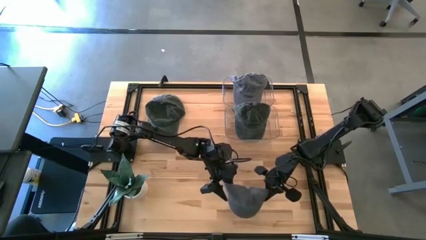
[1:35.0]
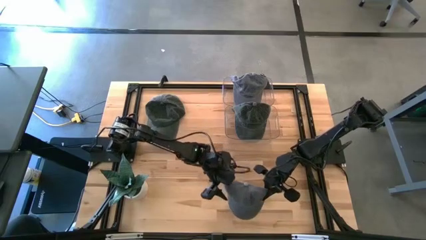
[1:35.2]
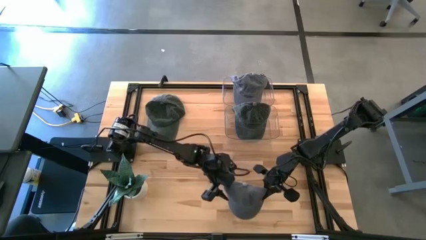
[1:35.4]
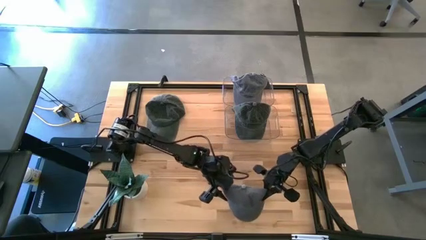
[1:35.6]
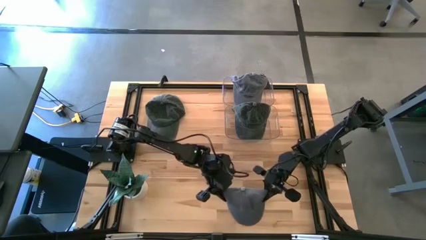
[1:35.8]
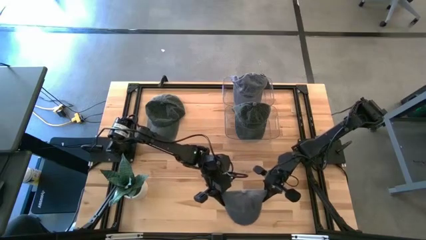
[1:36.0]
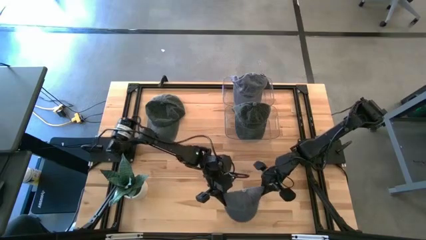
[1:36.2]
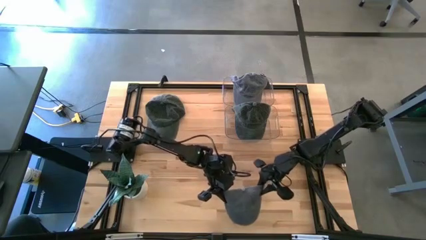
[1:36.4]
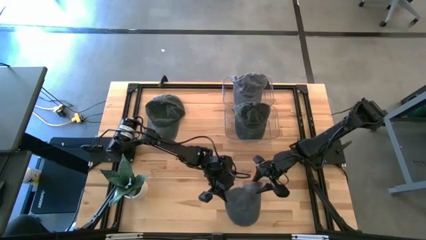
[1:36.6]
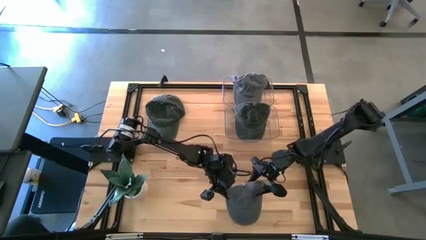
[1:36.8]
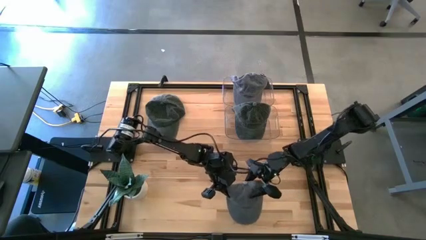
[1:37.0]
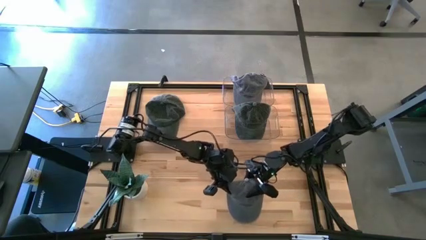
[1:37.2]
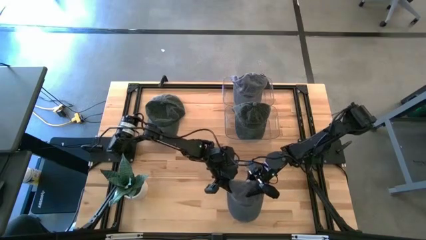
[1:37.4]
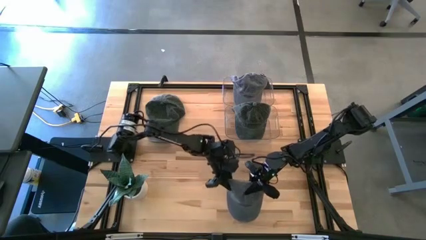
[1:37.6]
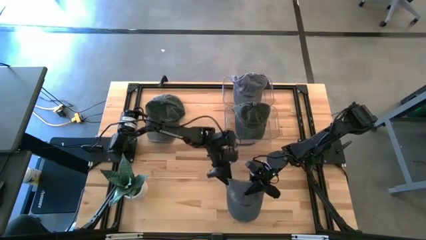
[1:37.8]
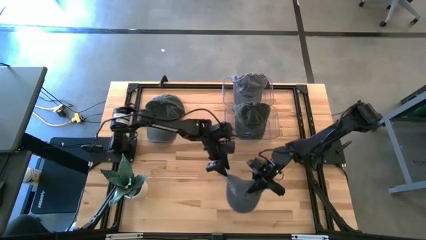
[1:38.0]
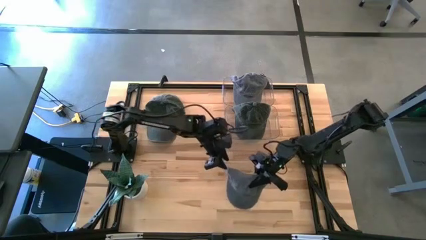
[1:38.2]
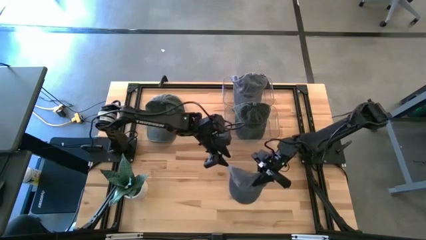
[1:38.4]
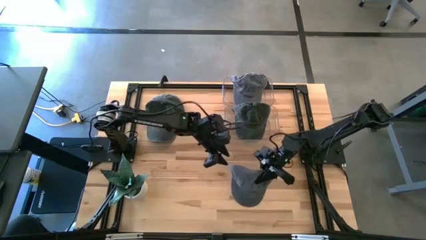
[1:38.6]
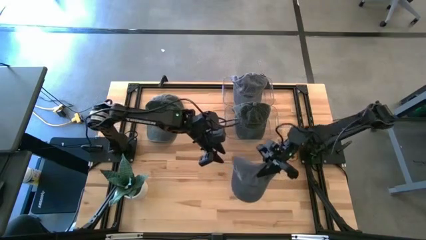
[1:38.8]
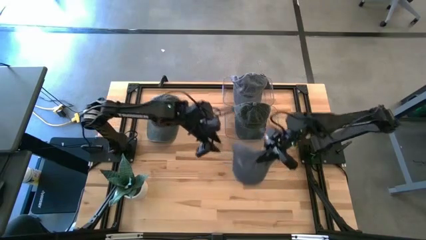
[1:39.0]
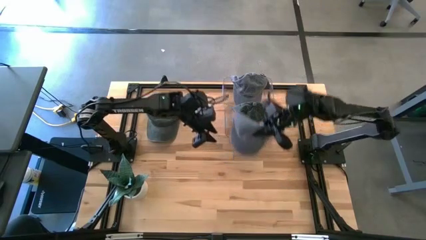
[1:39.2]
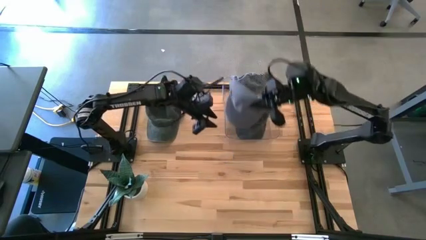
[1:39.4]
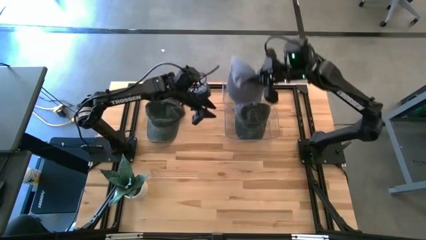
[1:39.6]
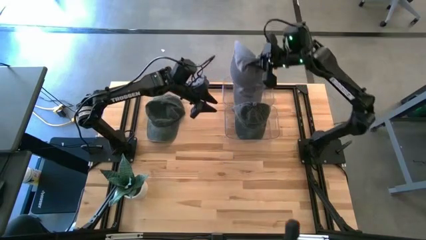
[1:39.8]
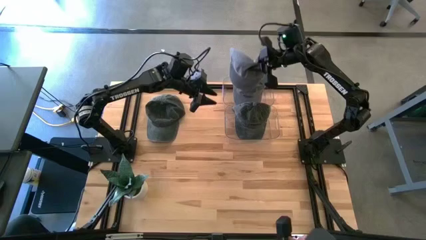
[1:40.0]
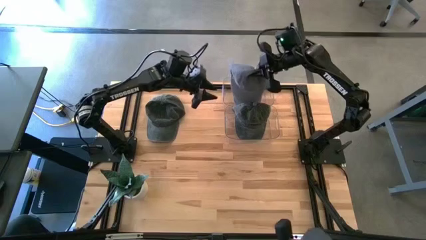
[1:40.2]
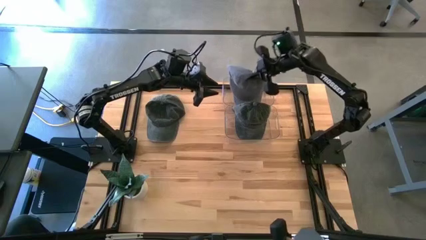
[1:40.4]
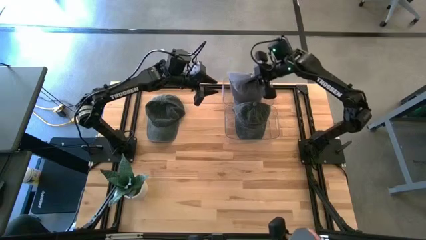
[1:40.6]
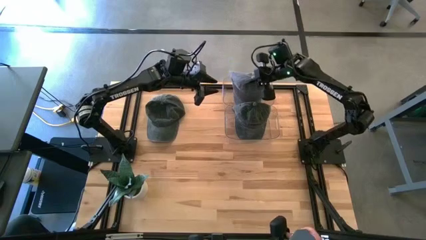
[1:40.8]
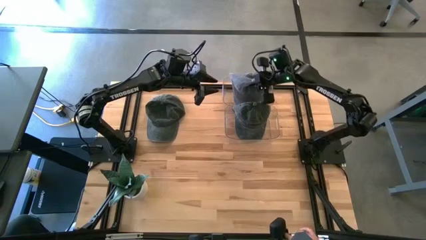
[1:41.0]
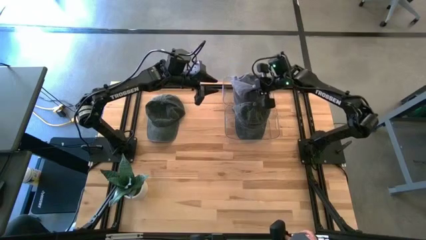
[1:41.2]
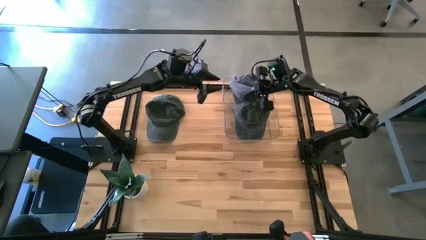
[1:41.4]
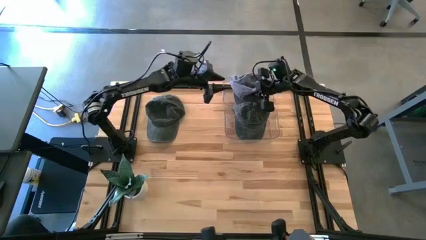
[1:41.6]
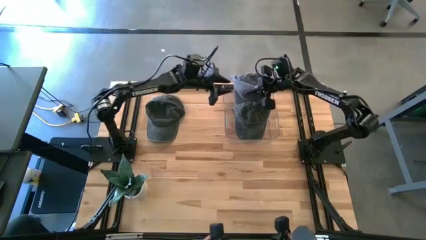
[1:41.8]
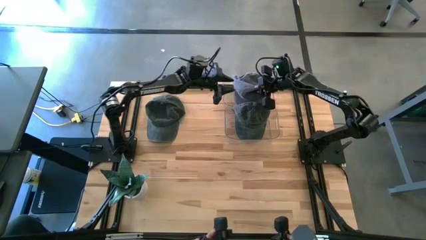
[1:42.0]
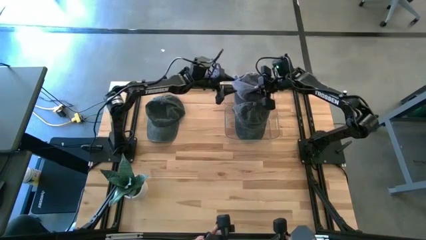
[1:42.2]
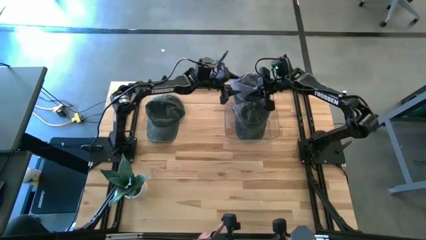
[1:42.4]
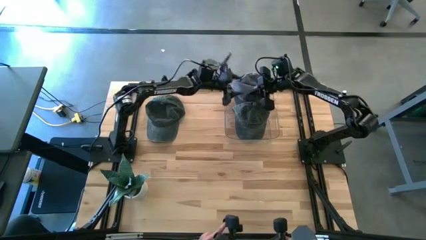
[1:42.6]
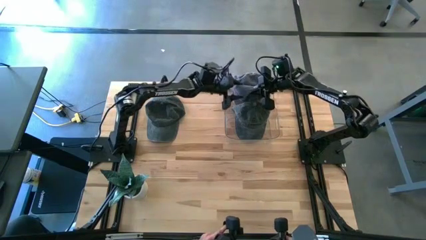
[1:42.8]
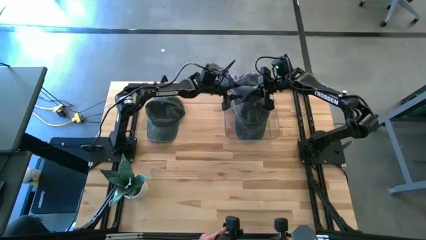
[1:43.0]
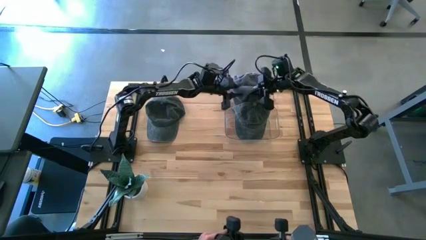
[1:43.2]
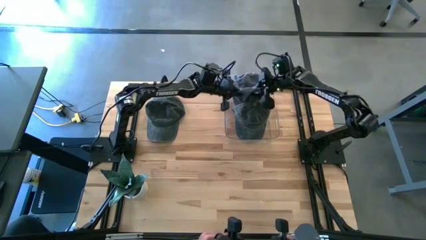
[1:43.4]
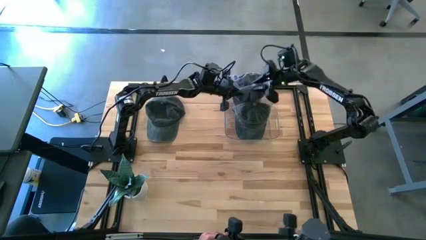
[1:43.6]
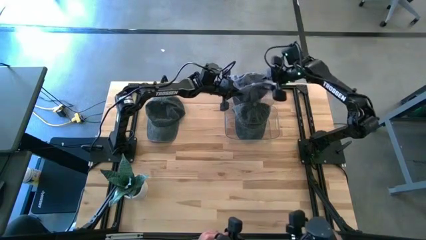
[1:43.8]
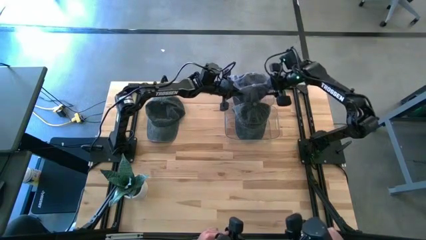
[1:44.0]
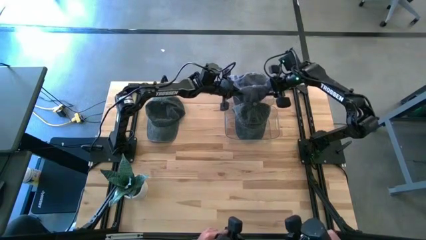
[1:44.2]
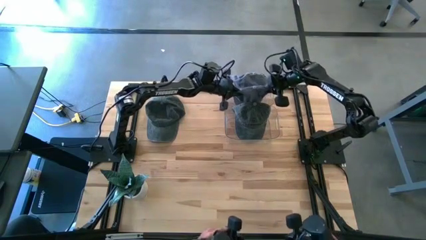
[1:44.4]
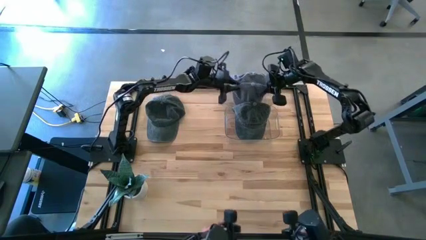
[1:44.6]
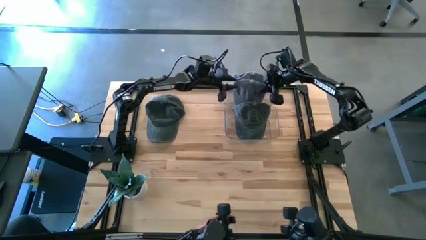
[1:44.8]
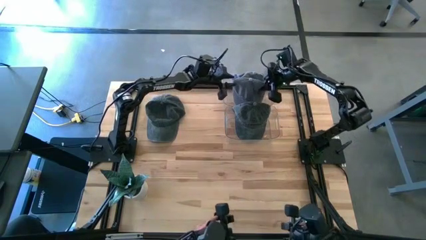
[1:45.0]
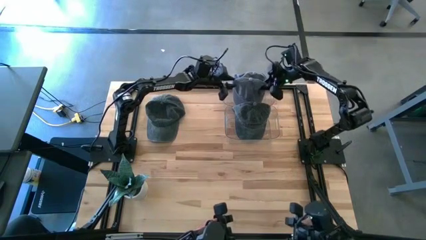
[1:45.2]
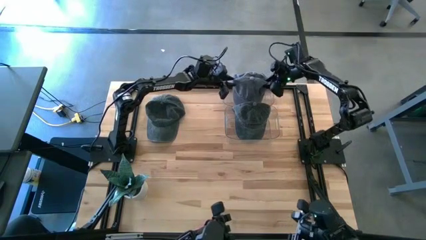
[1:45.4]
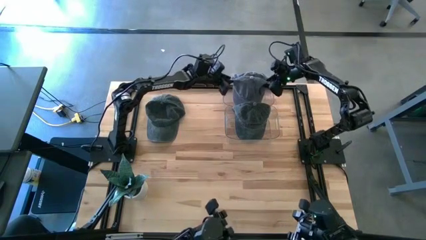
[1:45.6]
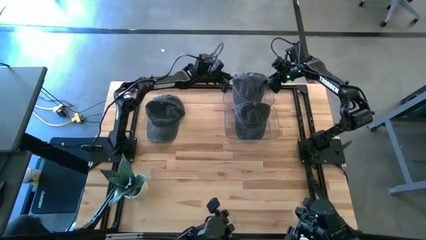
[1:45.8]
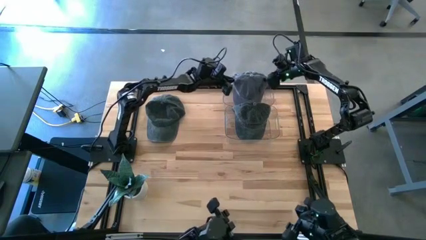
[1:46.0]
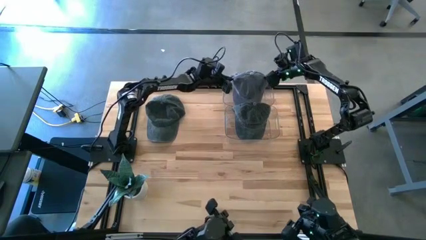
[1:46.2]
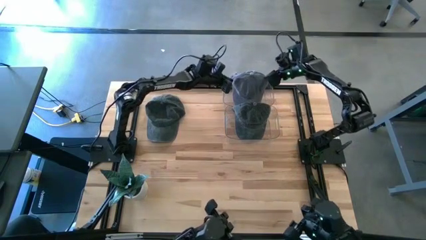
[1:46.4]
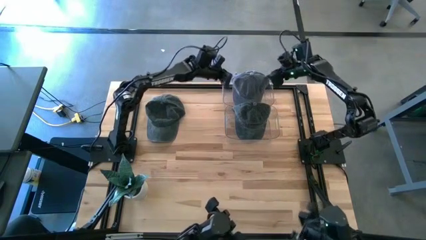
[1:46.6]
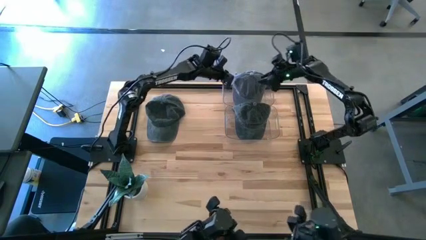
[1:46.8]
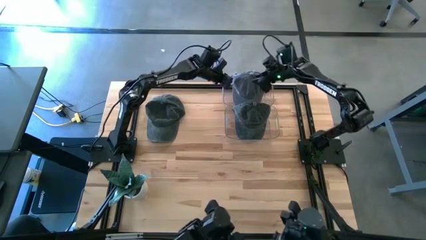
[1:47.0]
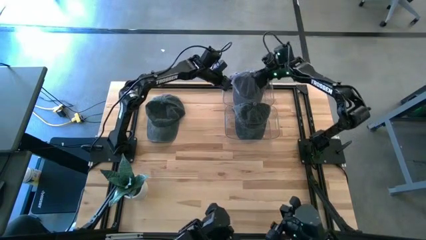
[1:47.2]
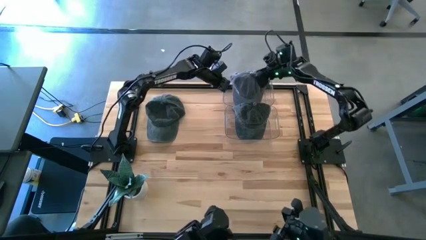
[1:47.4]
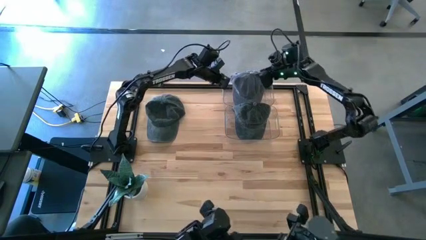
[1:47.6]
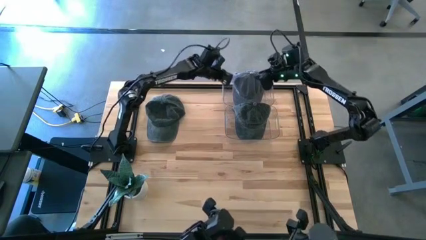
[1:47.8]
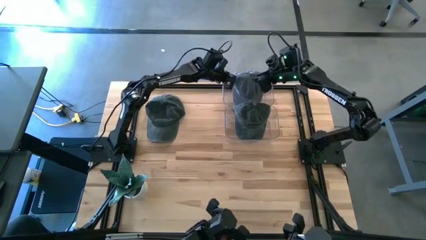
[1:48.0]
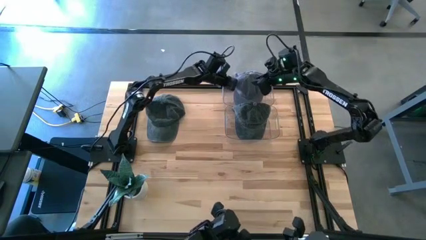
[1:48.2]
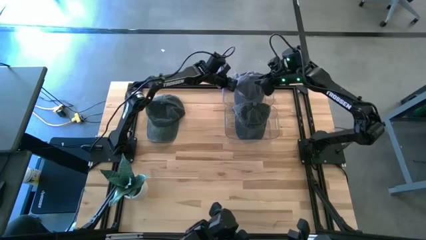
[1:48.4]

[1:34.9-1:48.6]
Task: Pick & Place hat
Put the gray cap into the top transparent bin

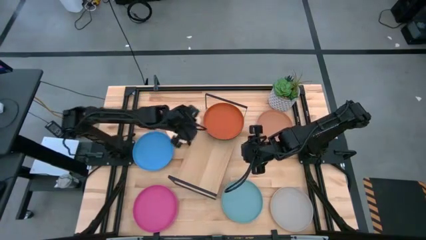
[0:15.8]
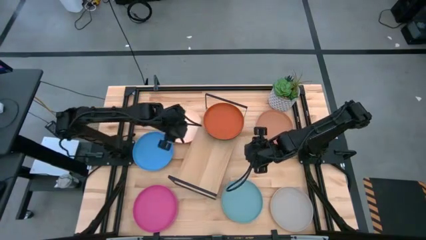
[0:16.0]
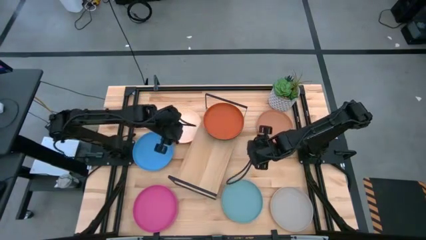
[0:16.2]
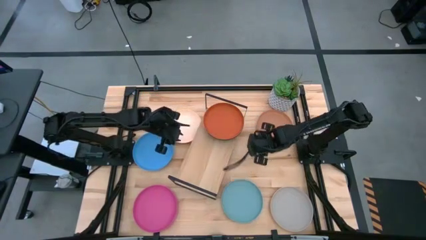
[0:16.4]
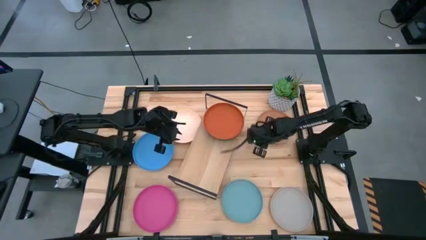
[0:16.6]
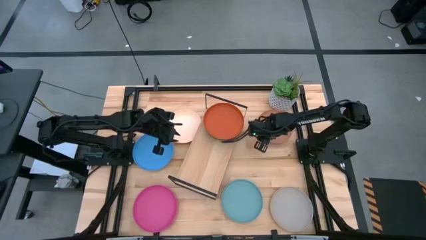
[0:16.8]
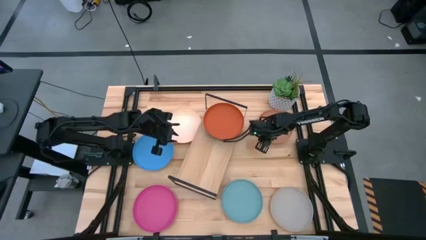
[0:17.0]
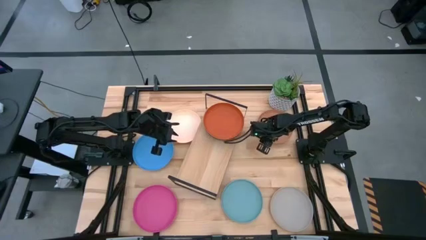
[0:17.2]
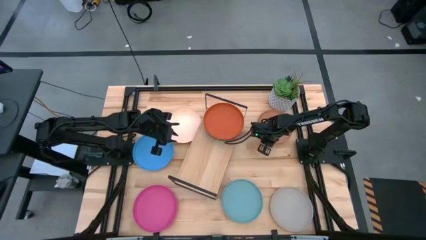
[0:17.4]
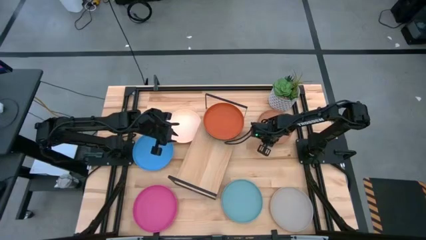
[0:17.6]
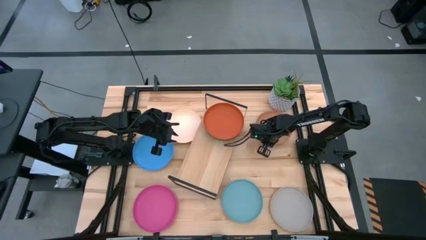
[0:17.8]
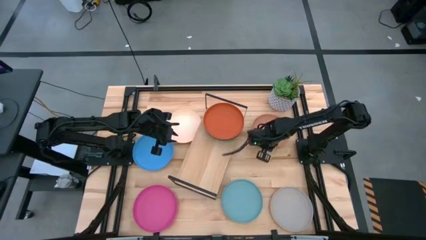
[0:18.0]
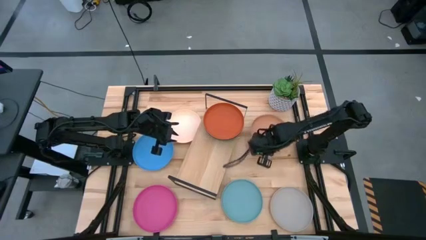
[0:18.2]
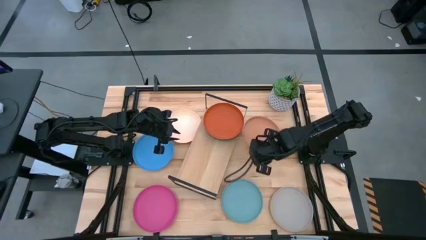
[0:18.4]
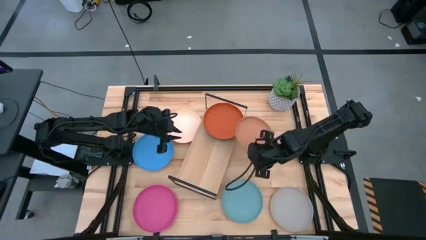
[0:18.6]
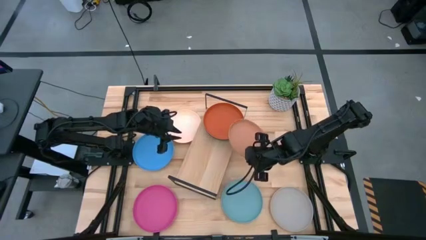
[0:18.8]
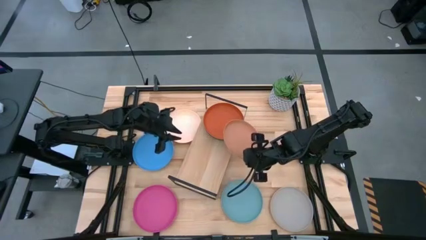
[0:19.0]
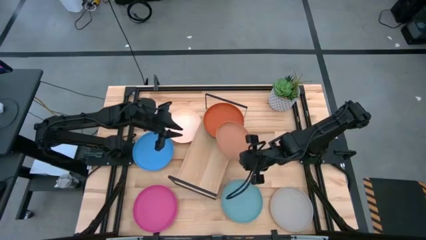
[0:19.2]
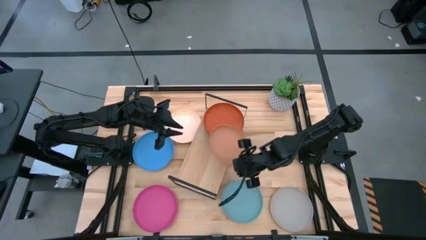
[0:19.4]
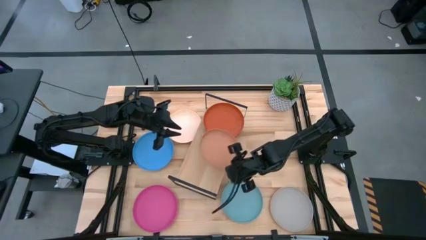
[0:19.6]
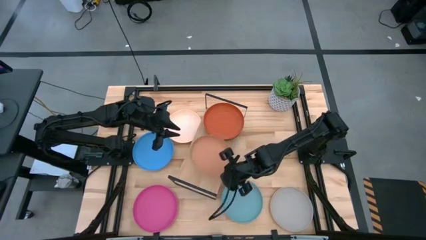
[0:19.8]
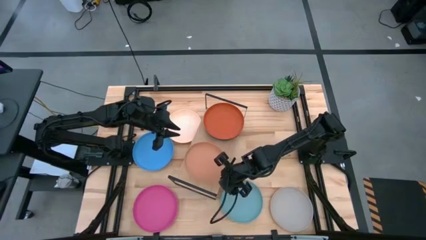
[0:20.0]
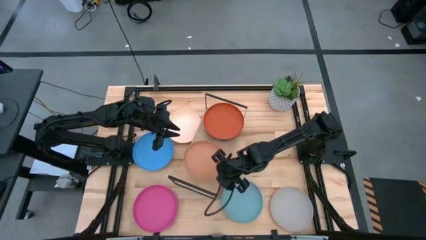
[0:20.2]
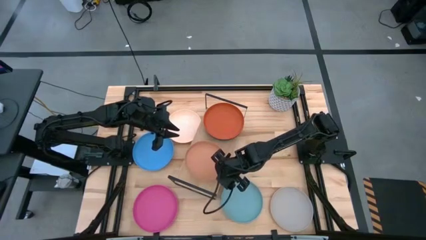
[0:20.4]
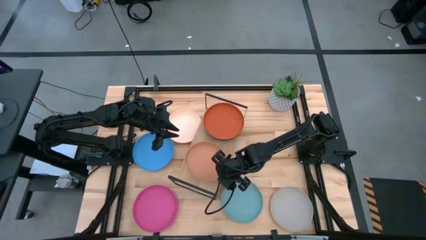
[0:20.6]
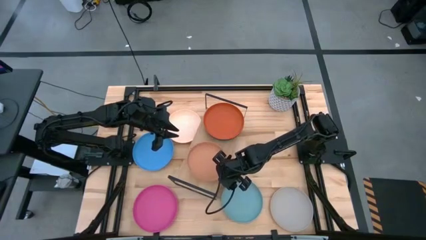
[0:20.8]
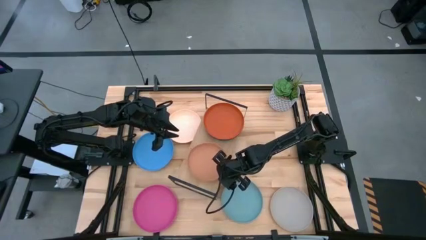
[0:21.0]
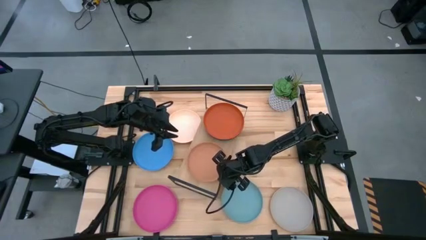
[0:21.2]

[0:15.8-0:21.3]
Task: Place and stack plates onto a shelf
Put the light brown plate on the shelf
